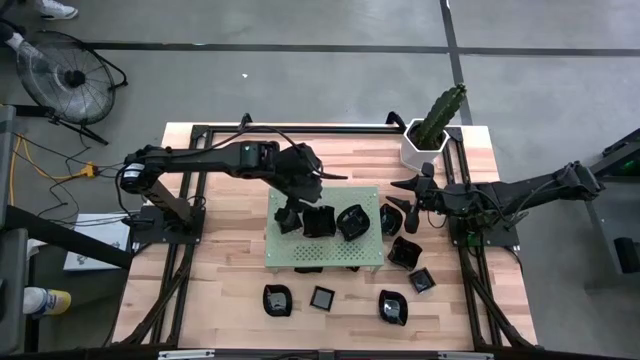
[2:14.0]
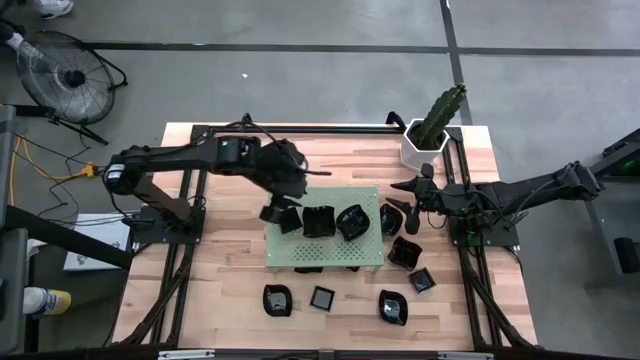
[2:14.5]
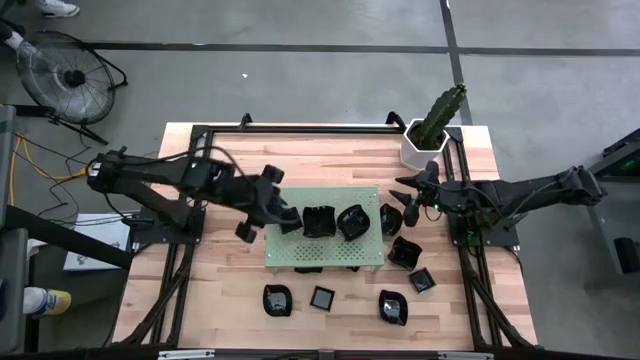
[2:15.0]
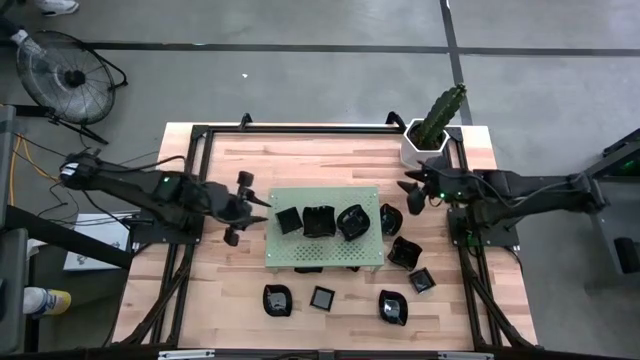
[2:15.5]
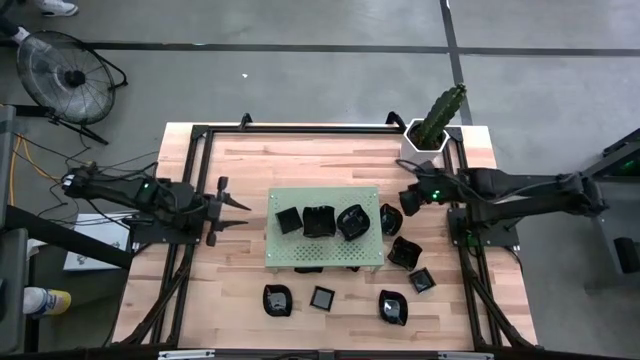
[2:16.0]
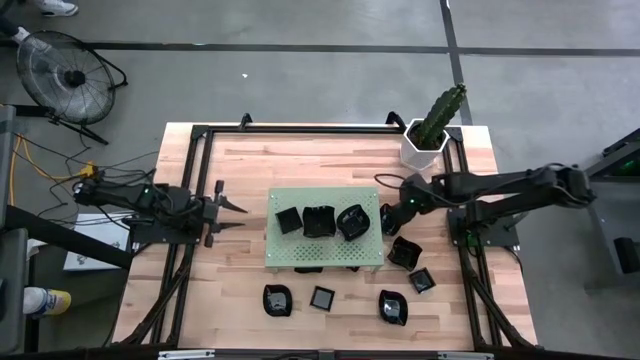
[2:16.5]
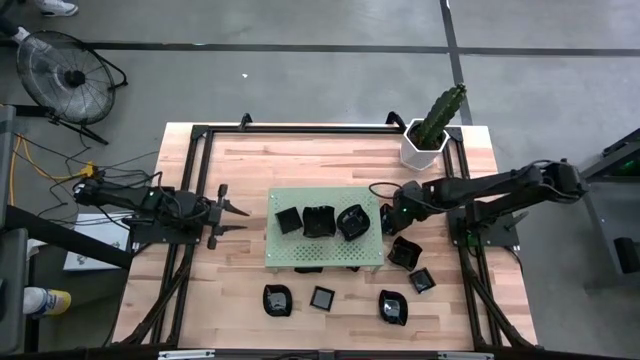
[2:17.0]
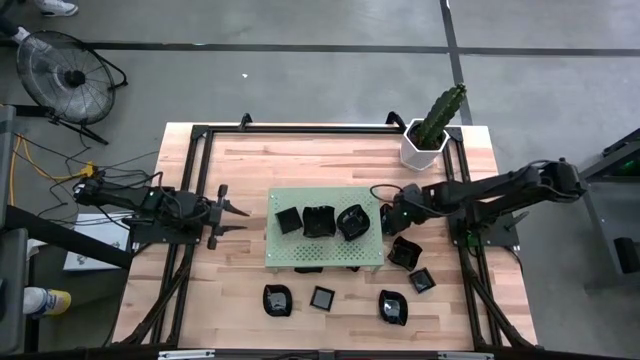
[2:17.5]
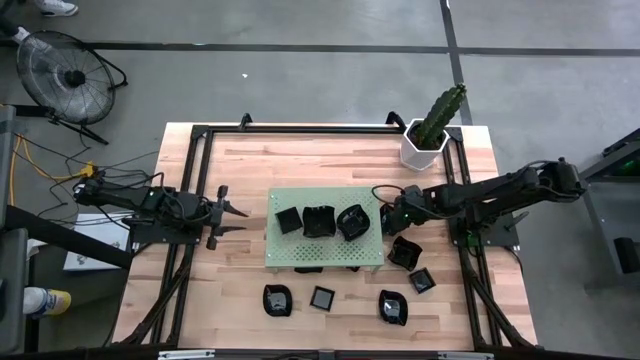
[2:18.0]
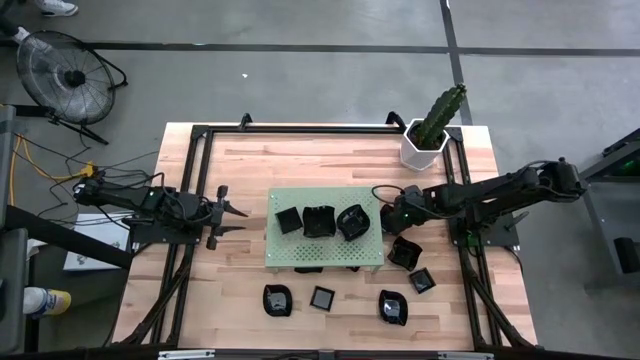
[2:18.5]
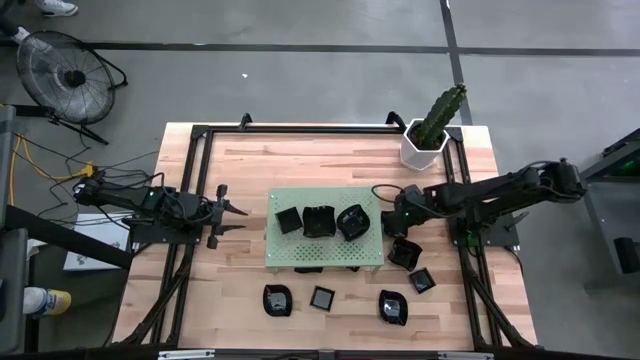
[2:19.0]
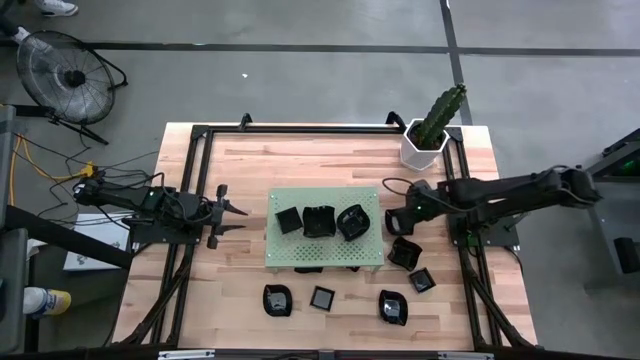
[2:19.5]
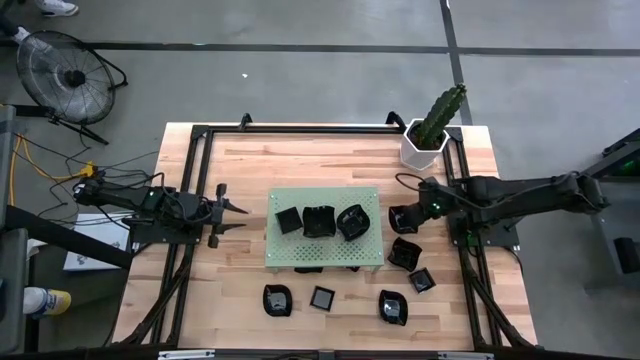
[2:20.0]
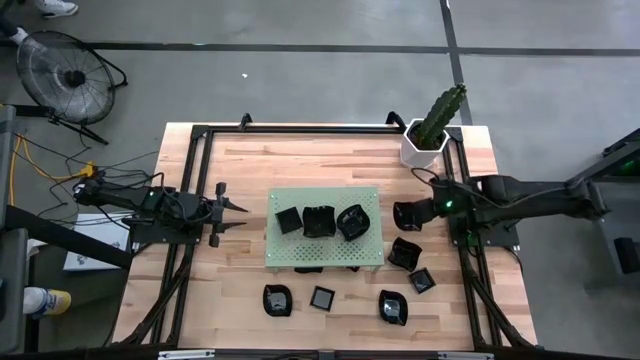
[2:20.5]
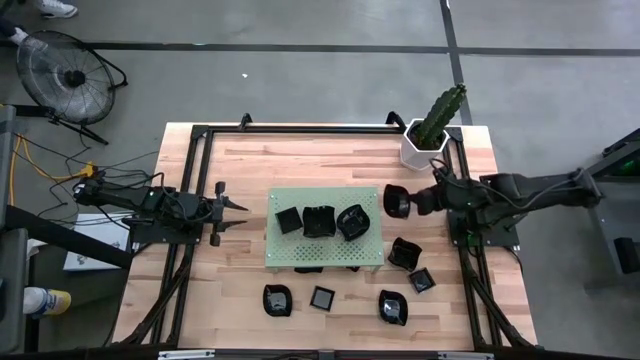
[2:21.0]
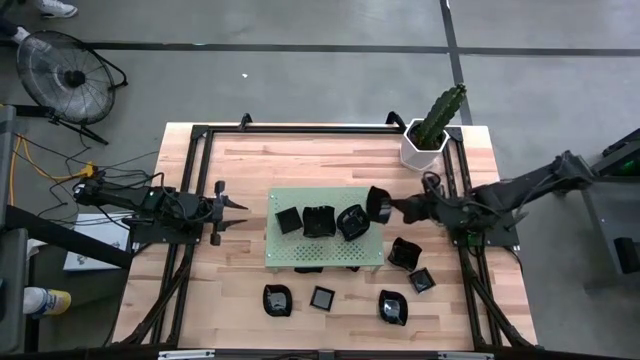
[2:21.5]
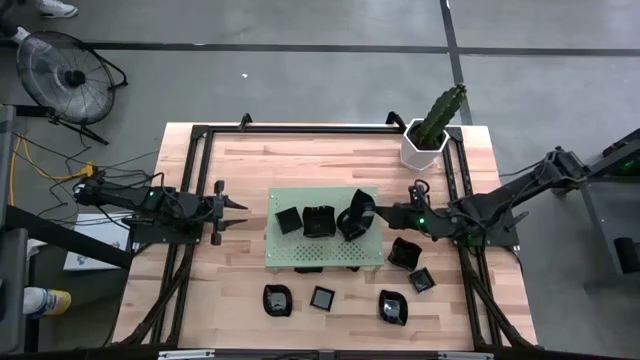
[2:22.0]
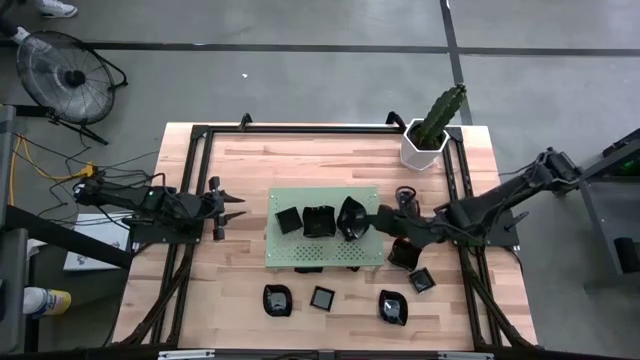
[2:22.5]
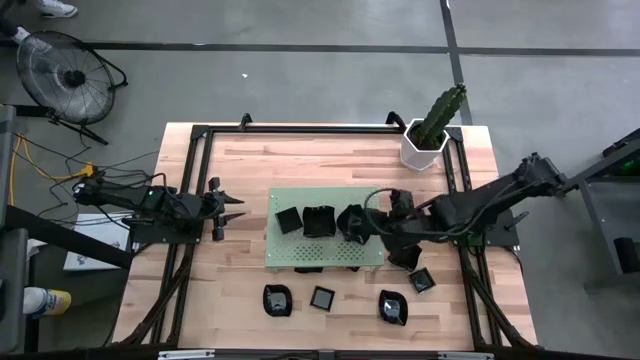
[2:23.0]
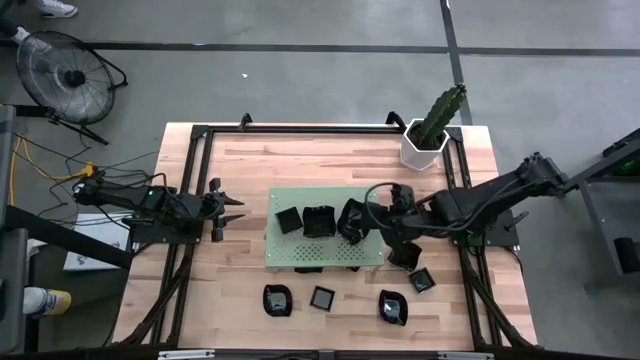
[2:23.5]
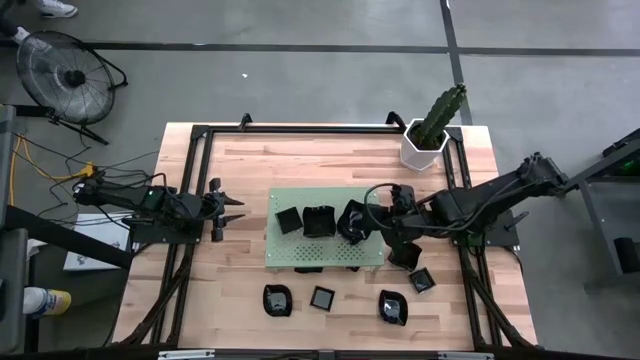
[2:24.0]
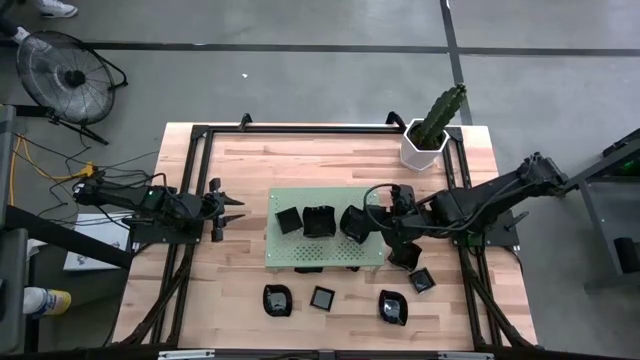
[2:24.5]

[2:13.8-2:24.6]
Task: Pick & Place Mini shaped plates
Stack the black leaf shaped bowl on top of the black leaf shaped bowl on the shelf

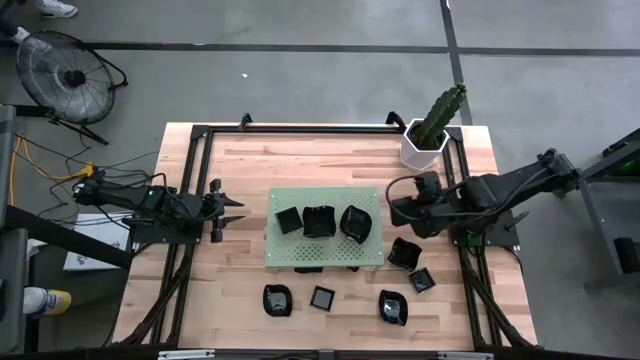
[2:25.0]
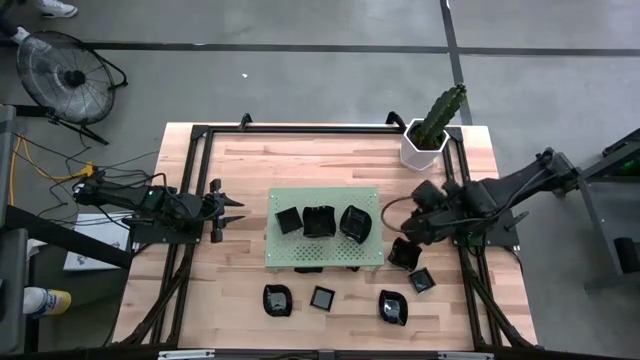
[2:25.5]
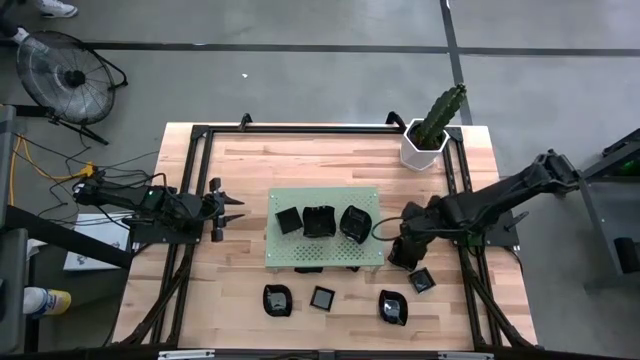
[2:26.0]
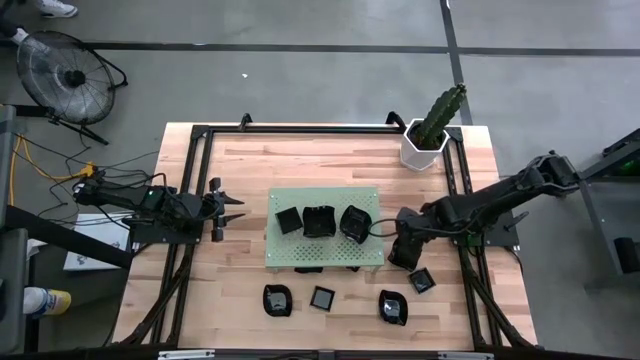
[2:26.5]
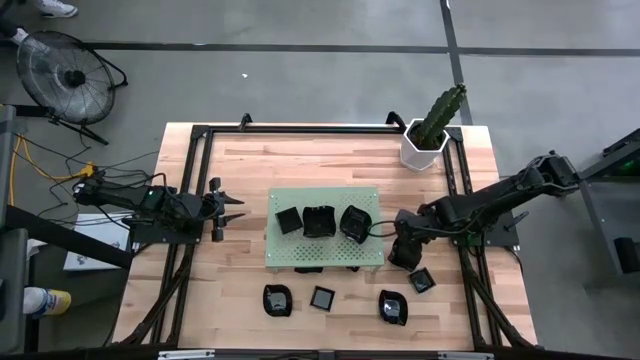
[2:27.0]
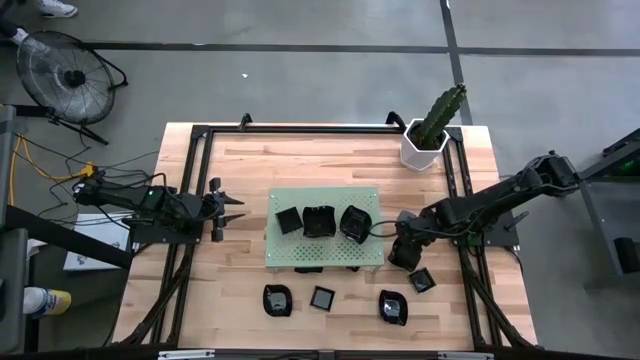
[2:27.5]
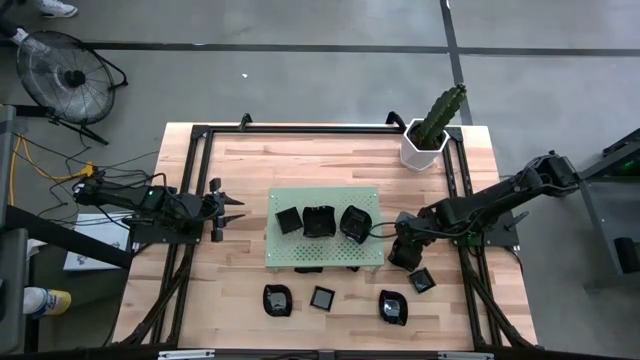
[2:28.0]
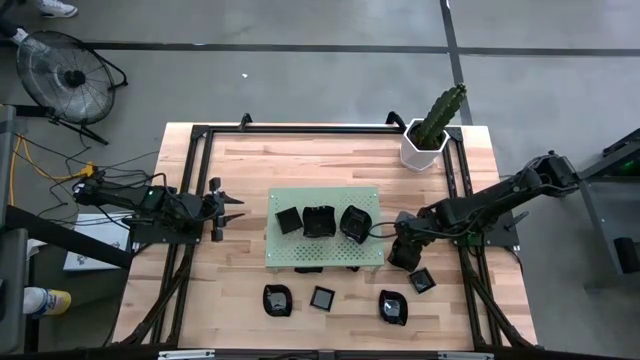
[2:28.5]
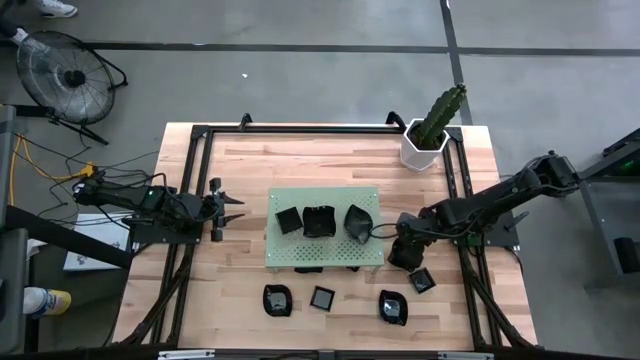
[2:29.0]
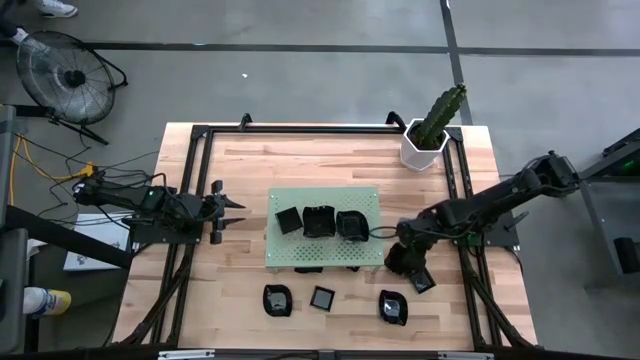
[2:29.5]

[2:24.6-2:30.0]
Stack the black wave square shaped bowl on top of the black wave square shaped bowl on the shelf

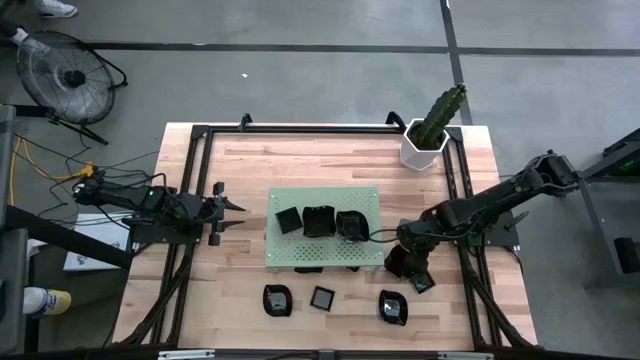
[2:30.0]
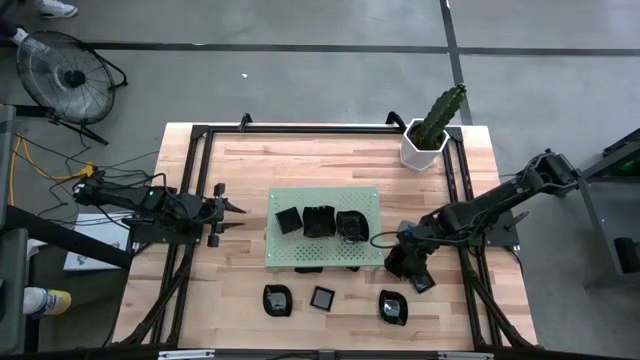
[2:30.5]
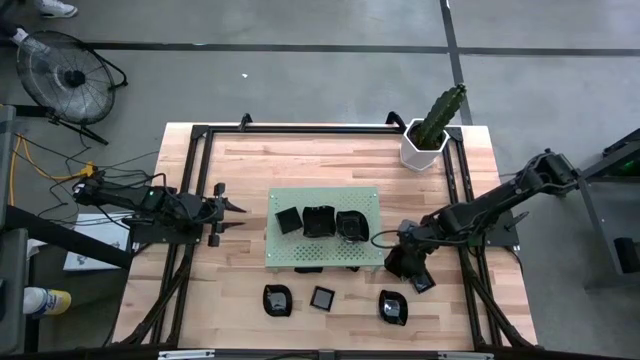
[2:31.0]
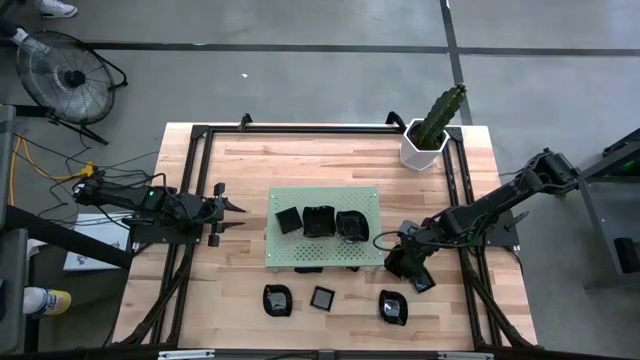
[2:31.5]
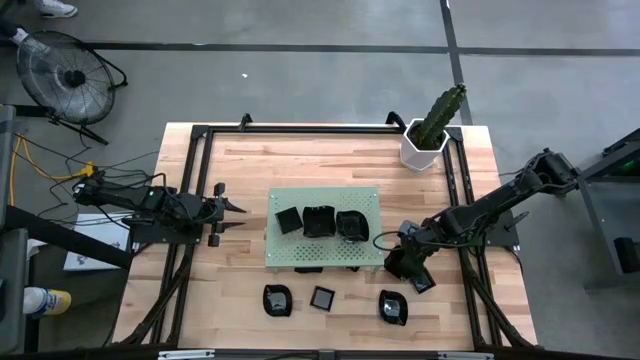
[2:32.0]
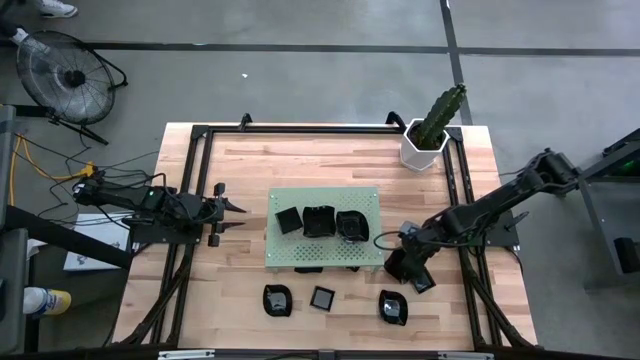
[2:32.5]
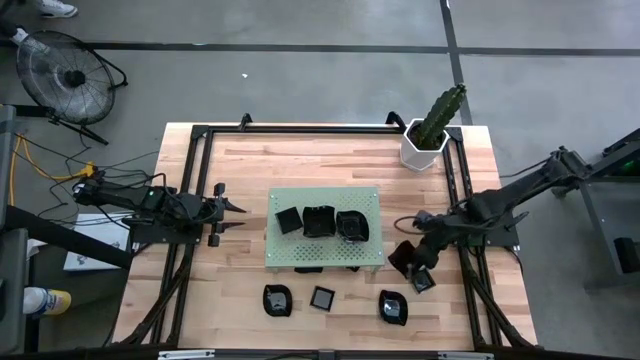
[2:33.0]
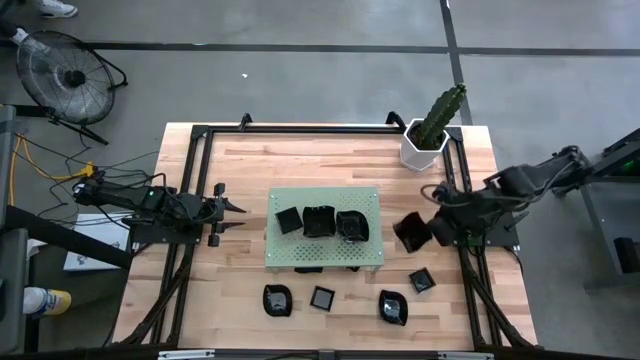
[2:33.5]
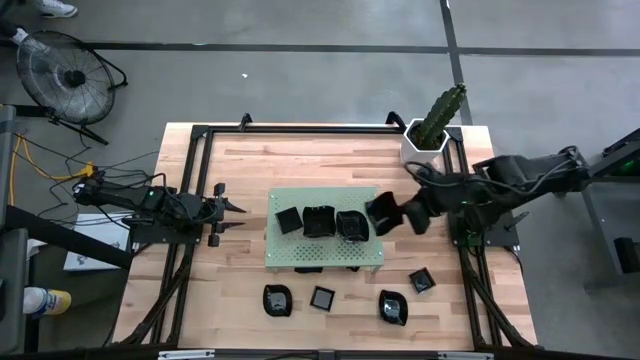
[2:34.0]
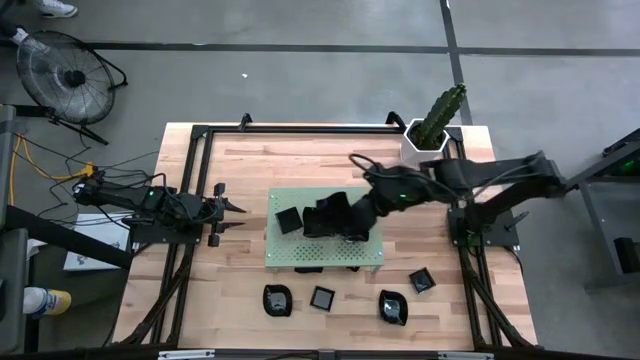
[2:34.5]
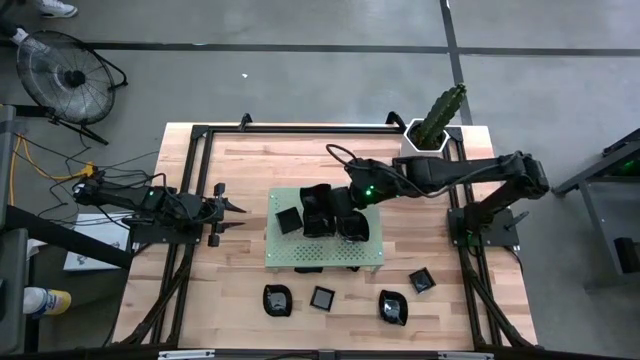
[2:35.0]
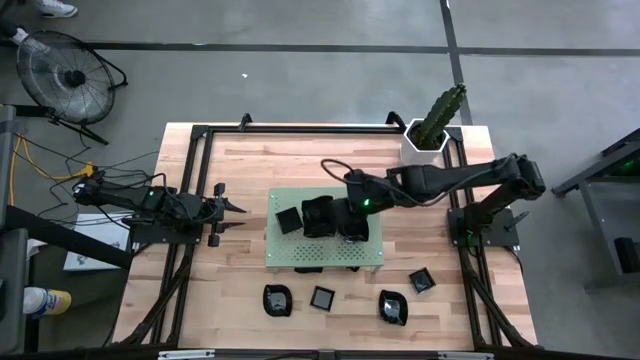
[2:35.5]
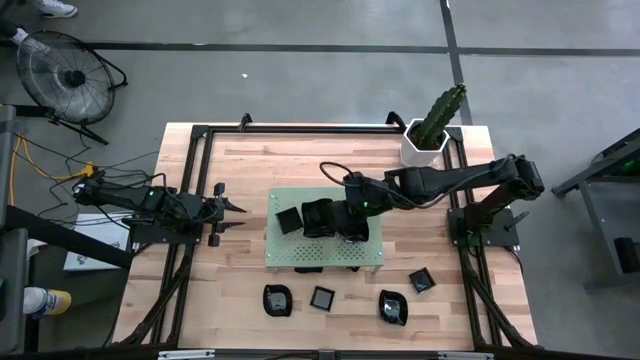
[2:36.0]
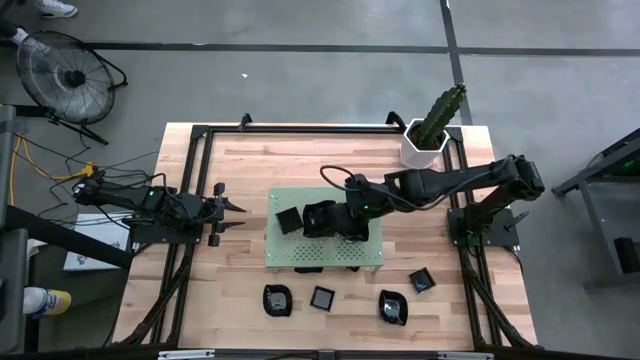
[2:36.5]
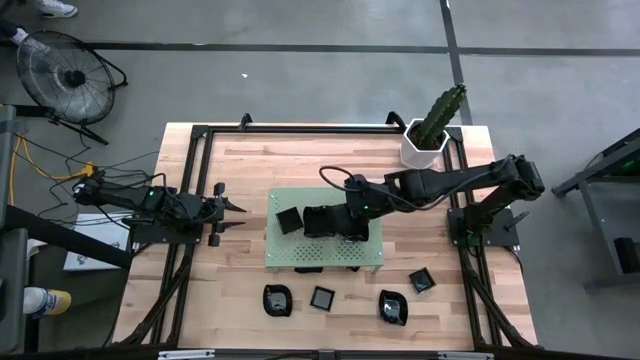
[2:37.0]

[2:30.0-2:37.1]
Stack the black wave square shaped bowl on top of the black wave square shaped bowl on the shelf
